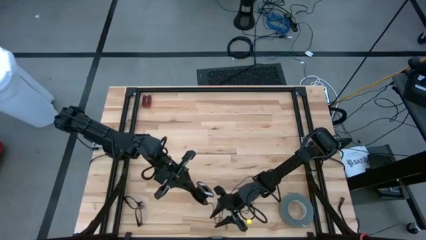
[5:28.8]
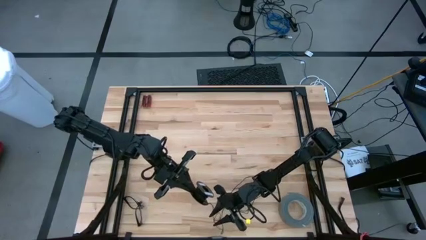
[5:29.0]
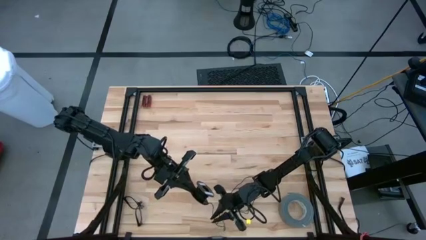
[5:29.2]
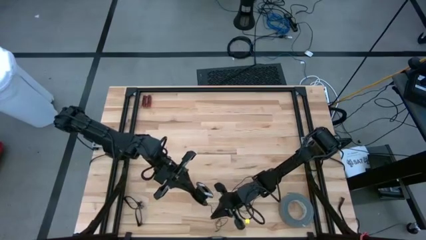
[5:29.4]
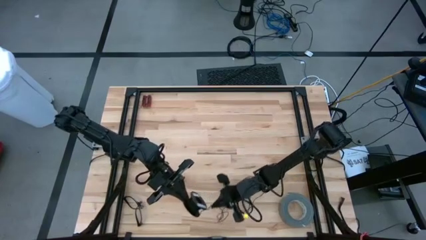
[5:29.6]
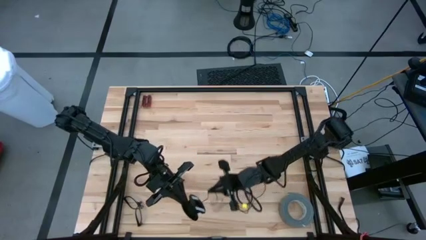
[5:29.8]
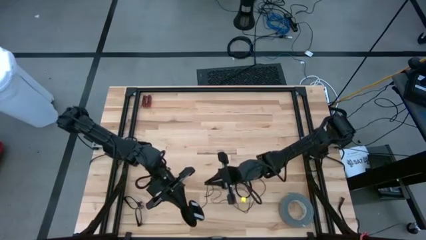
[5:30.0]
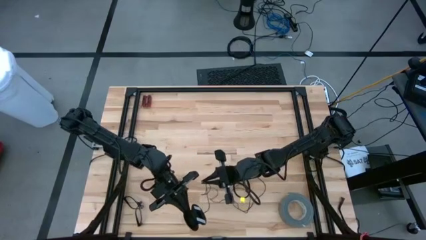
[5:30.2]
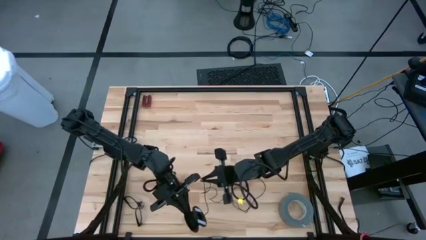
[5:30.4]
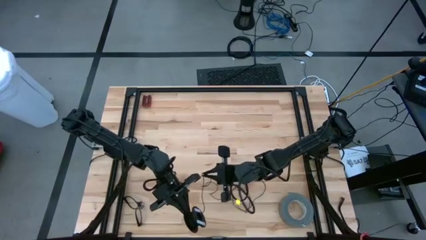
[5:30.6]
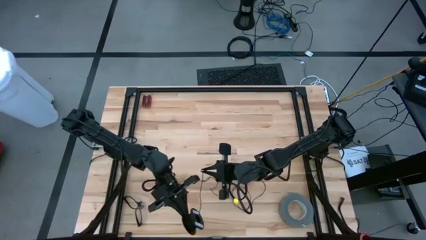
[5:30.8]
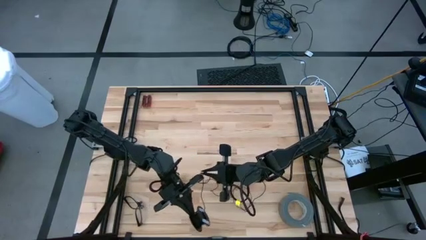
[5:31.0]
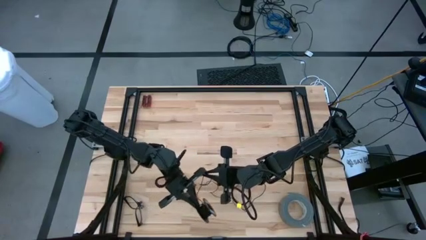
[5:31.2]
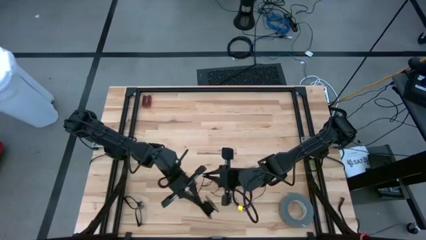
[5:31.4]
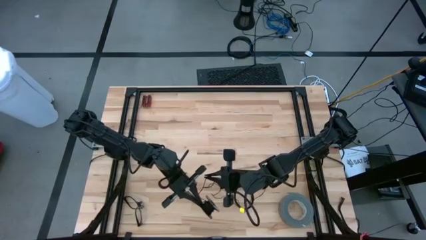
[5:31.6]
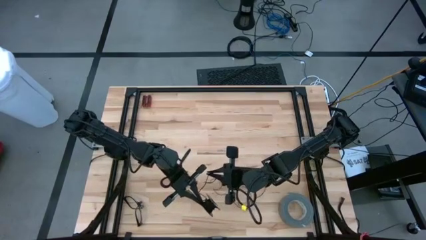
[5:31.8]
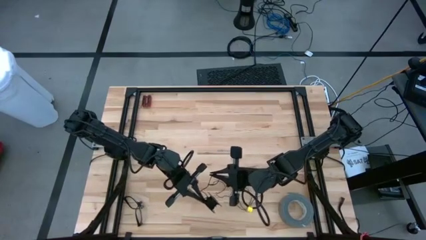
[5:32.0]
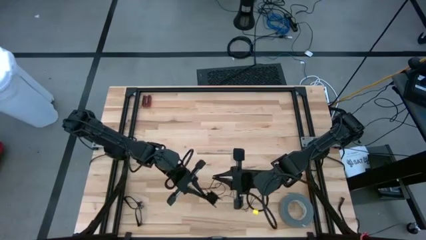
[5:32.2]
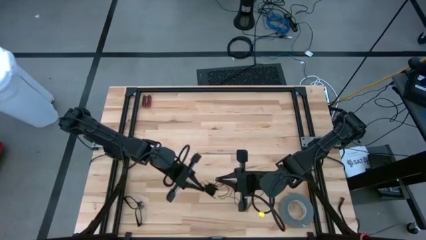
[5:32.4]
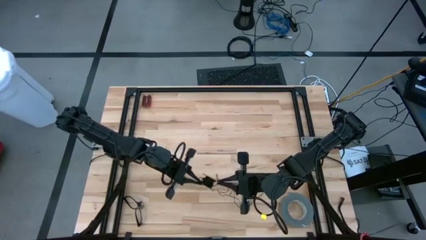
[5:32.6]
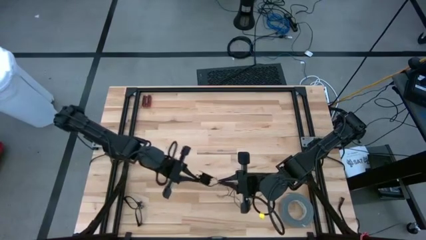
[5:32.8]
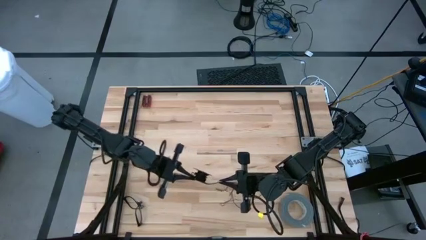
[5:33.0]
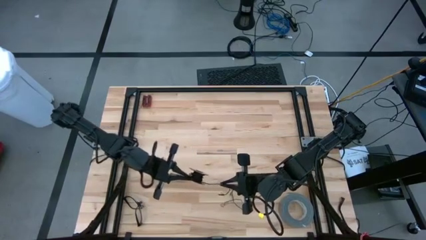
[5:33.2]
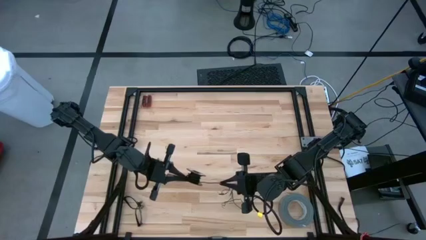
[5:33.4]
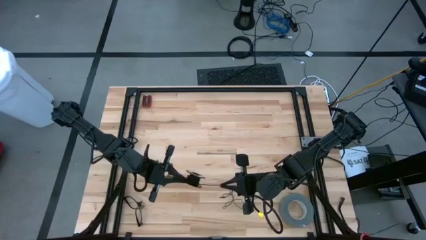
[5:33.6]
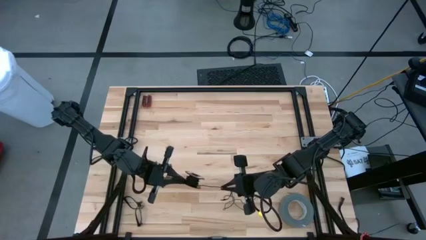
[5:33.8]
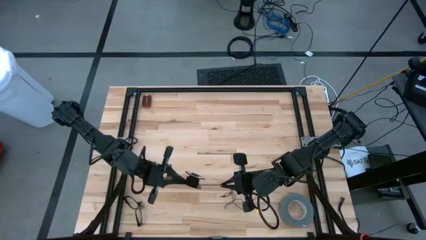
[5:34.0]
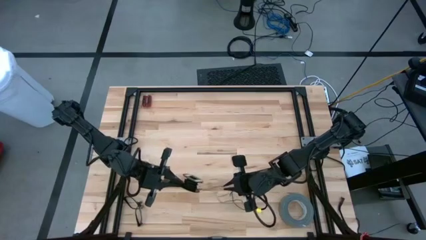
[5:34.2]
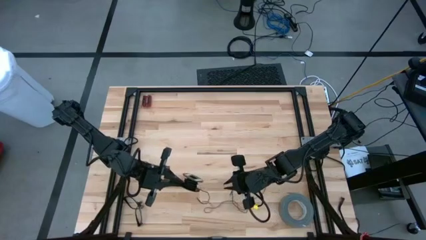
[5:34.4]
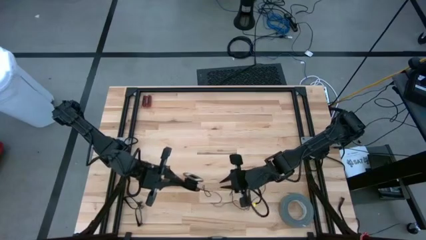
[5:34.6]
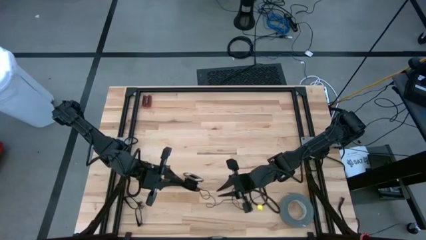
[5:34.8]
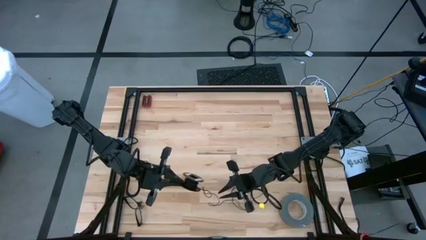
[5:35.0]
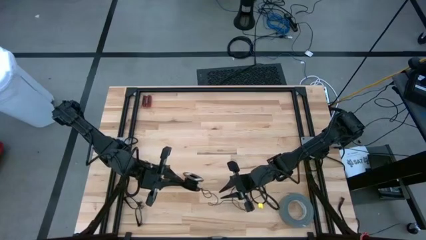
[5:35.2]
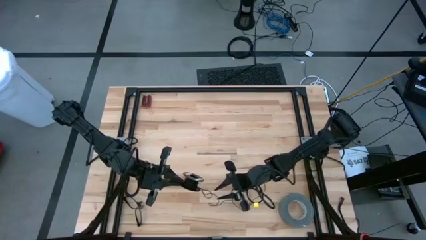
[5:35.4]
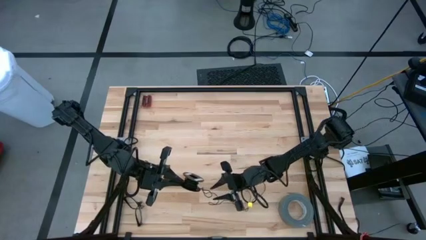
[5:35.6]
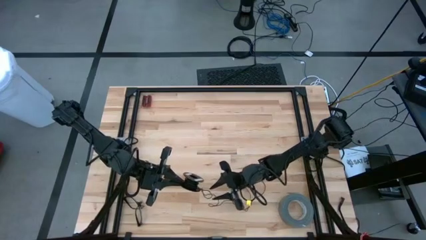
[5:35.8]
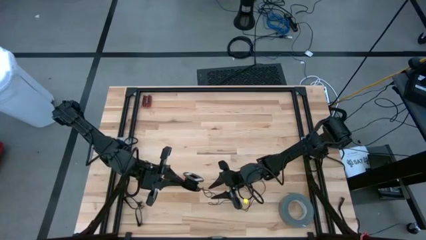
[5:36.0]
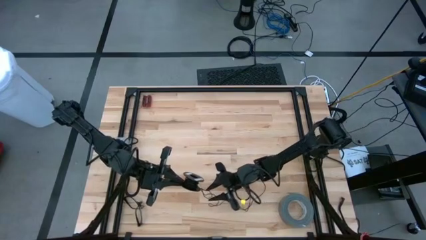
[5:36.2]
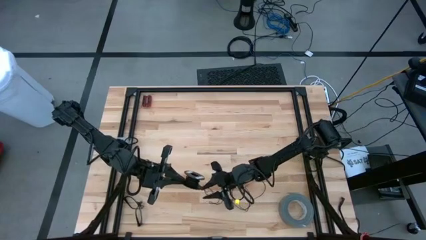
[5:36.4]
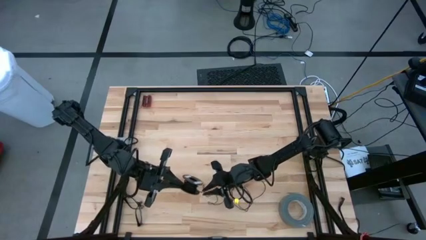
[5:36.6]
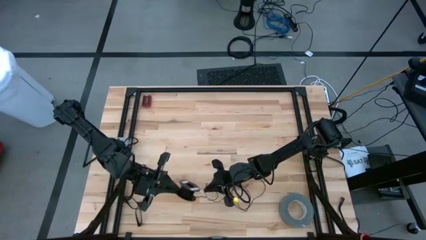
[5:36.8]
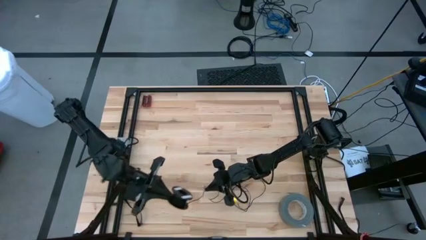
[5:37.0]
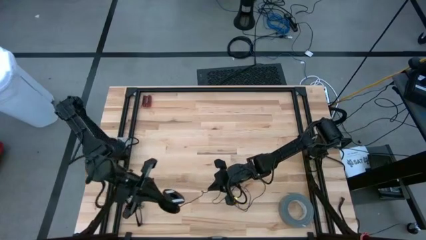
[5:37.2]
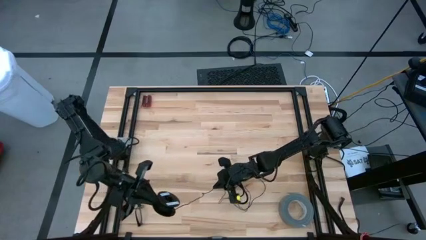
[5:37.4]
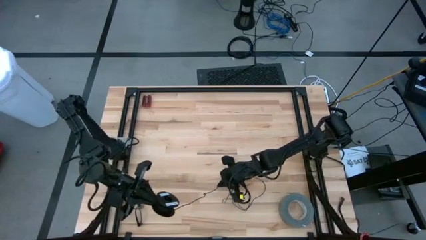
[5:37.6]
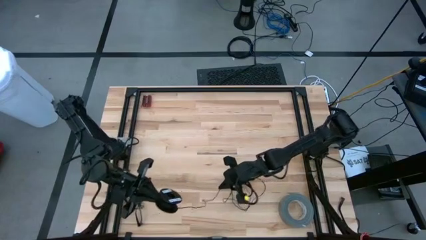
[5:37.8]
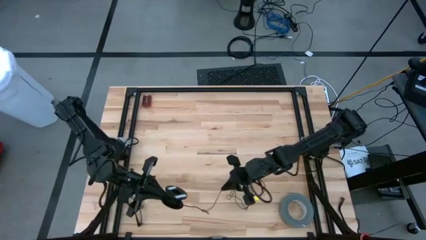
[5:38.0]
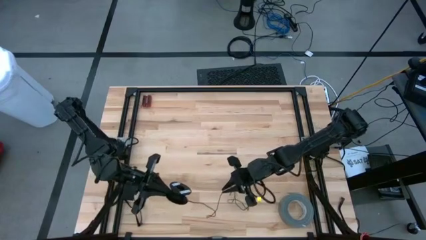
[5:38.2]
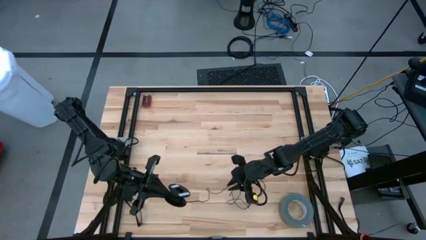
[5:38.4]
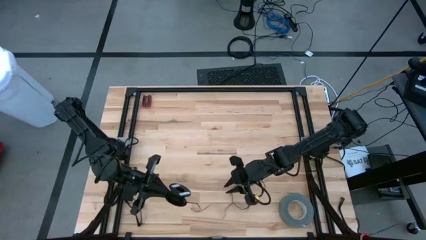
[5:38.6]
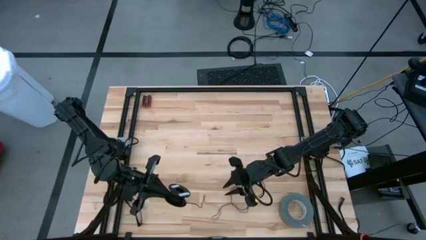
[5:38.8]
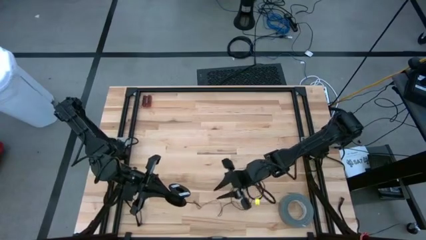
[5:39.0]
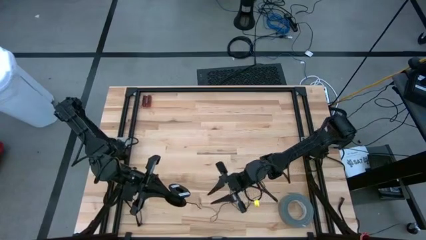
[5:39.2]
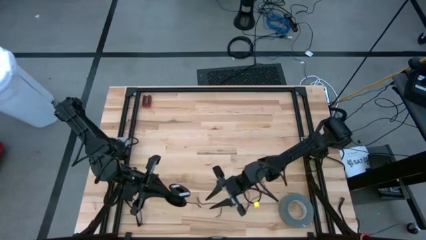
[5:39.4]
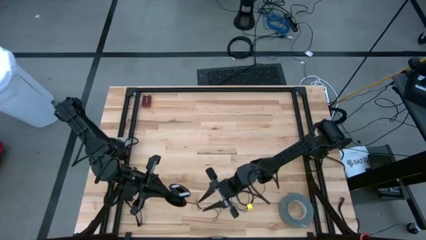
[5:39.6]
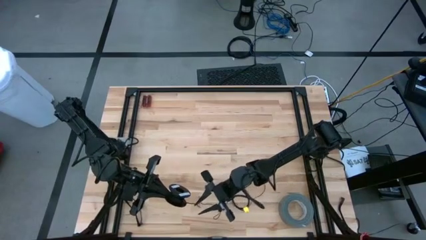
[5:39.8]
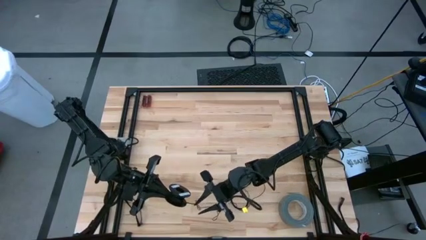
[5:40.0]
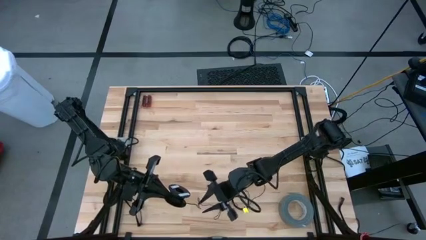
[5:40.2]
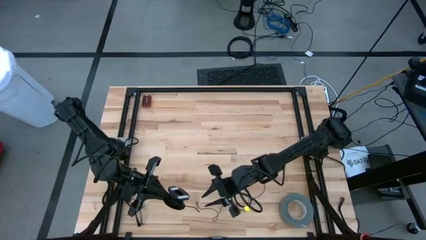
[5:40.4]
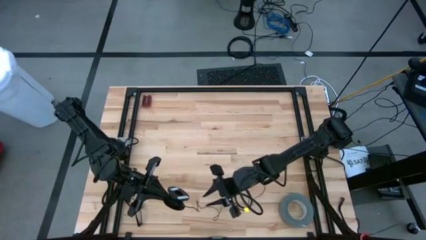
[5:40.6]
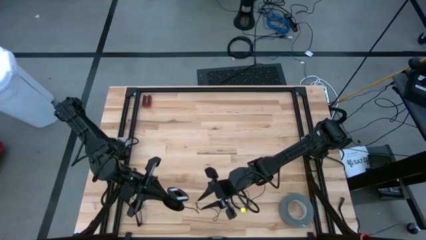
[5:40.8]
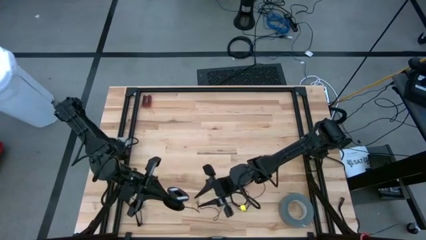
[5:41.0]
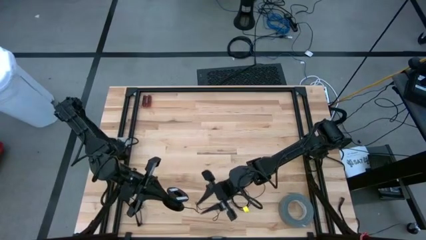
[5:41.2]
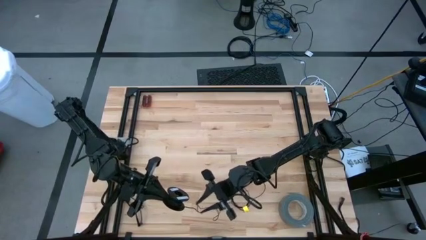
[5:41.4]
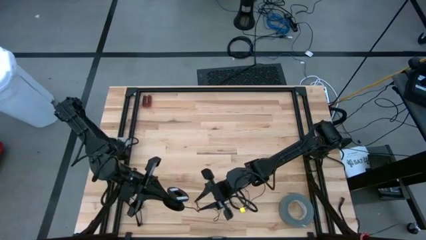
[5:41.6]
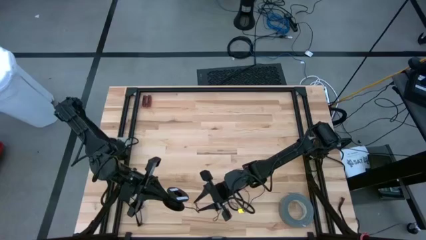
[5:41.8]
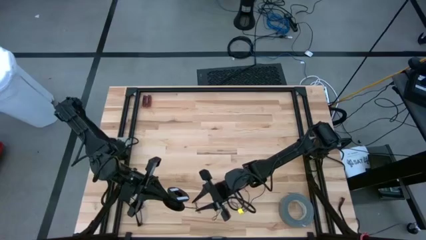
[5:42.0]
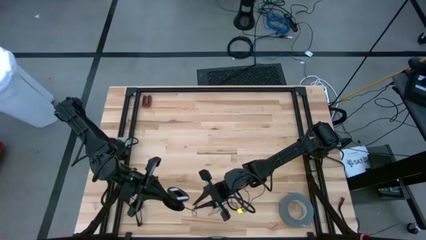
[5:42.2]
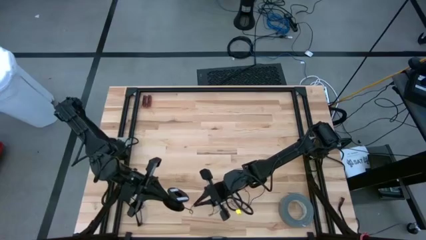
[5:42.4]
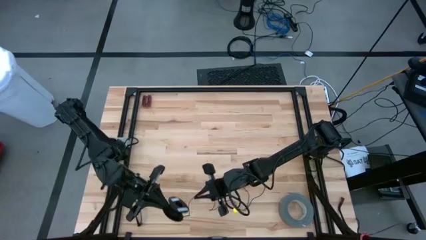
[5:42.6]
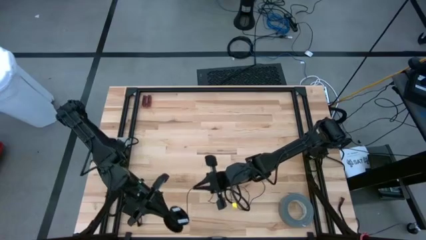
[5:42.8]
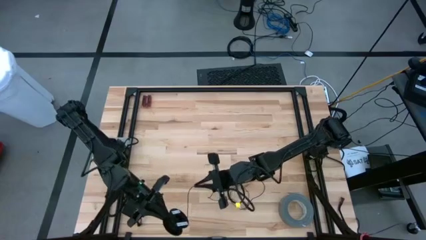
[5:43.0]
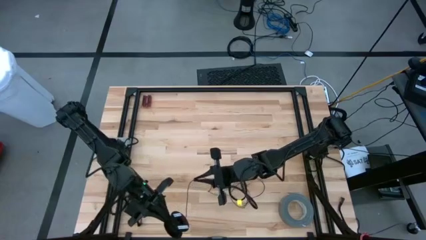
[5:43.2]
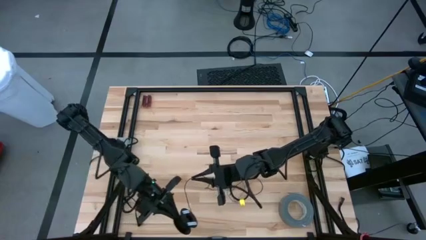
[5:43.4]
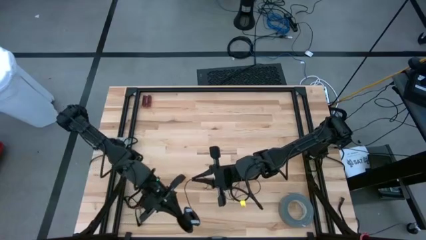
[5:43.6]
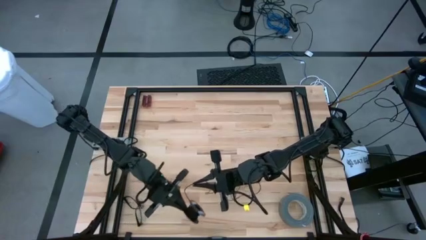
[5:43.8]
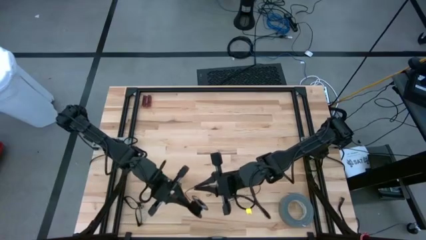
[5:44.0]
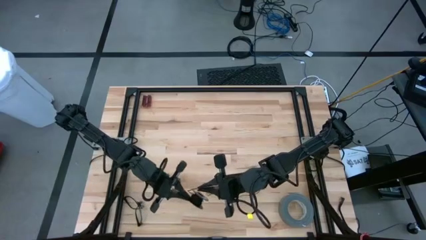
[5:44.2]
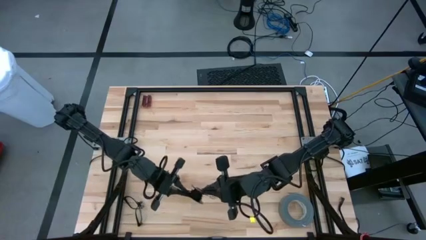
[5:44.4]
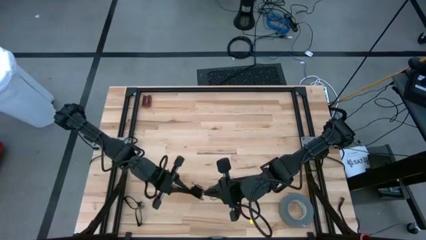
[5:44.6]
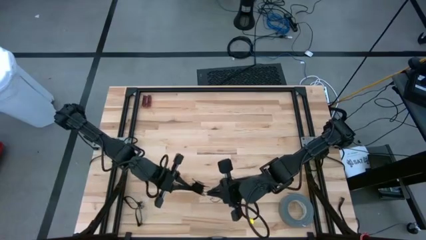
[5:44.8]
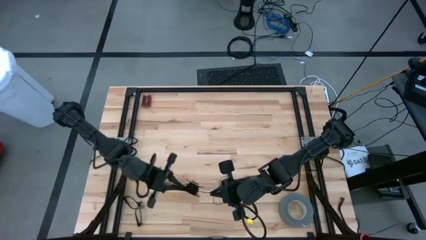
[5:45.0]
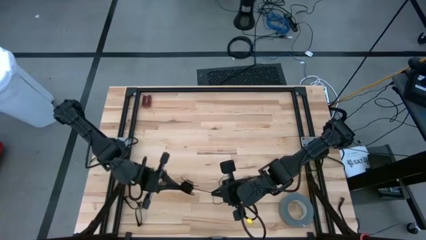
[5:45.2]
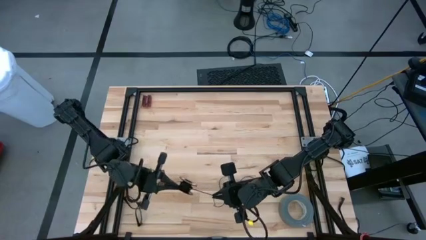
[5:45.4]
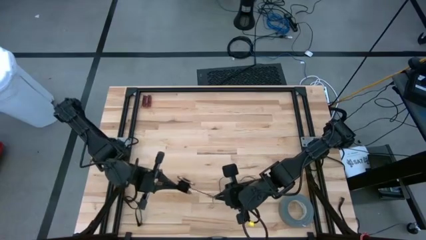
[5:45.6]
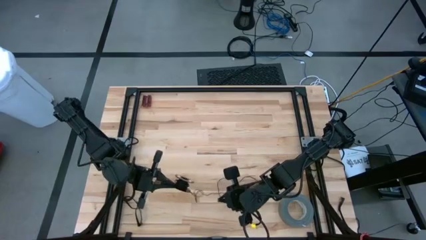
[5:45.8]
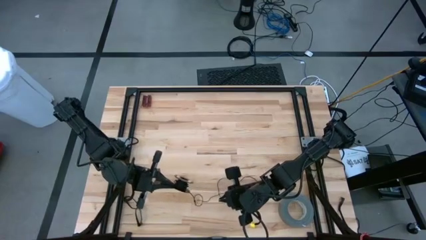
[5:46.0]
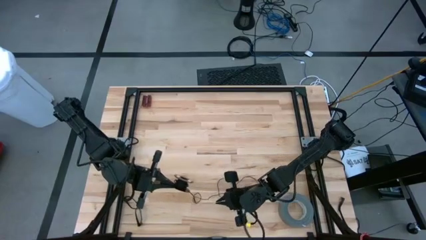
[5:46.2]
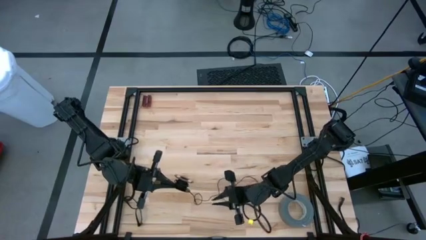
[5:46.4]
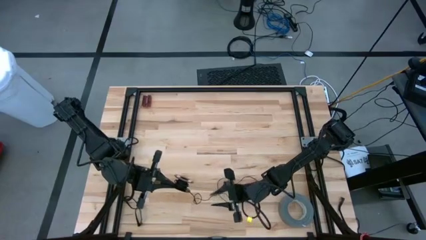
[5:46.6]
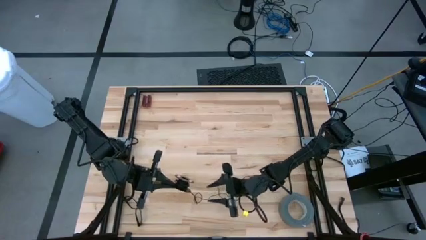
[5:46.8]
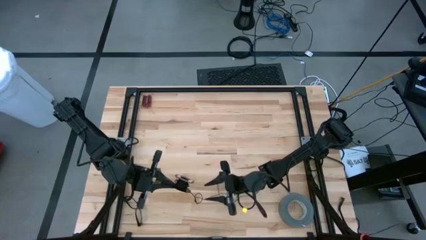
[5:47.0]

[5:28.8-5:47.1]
Task: Coil cords
Coil the black wire on the spool
